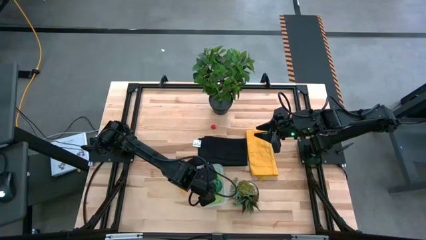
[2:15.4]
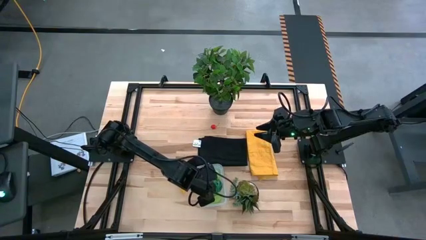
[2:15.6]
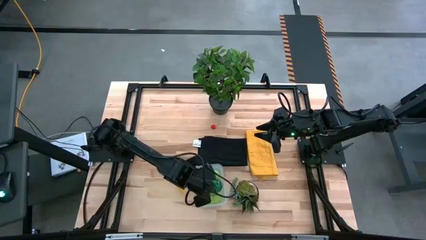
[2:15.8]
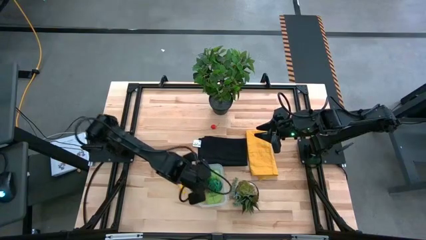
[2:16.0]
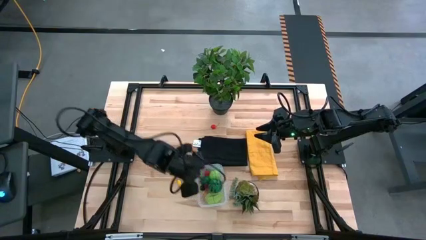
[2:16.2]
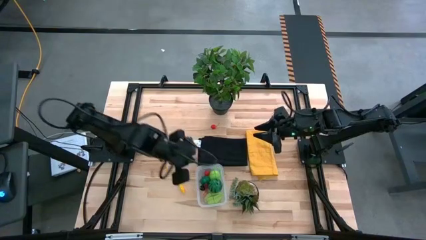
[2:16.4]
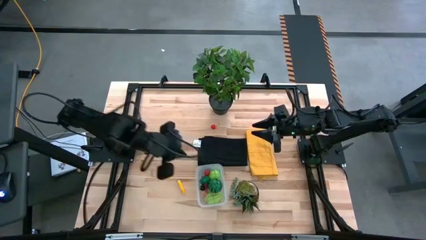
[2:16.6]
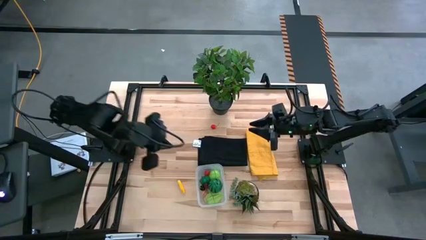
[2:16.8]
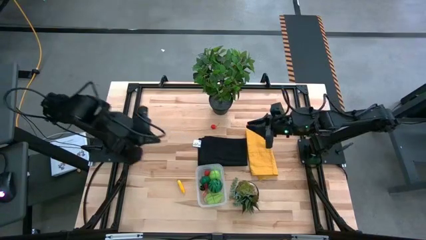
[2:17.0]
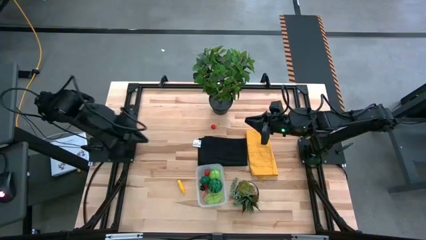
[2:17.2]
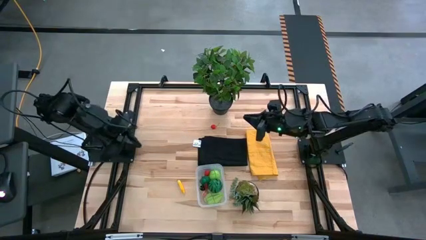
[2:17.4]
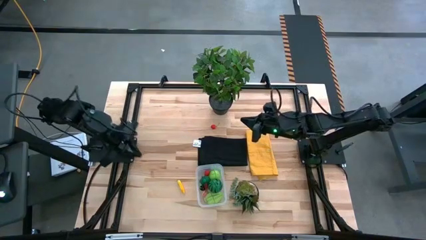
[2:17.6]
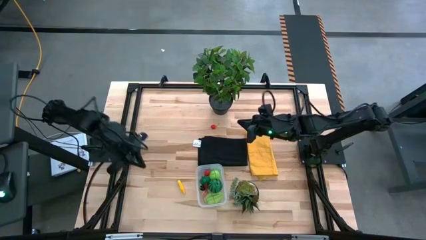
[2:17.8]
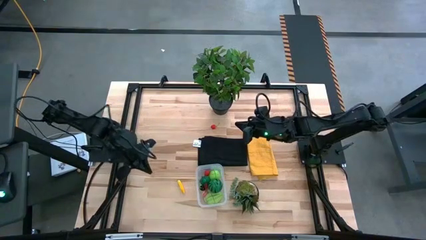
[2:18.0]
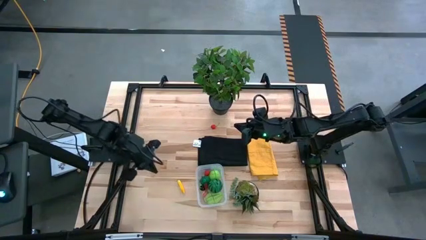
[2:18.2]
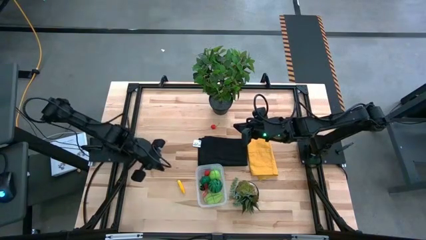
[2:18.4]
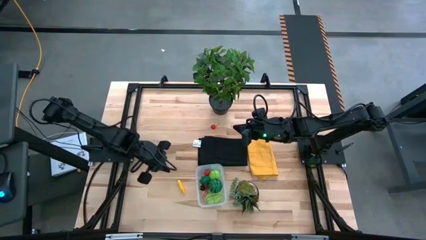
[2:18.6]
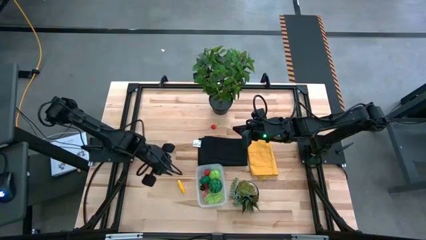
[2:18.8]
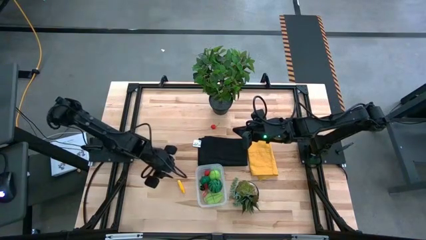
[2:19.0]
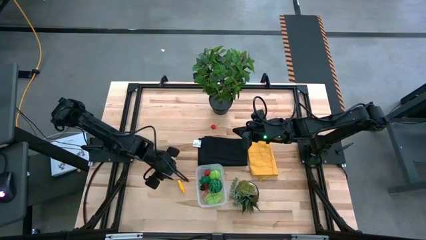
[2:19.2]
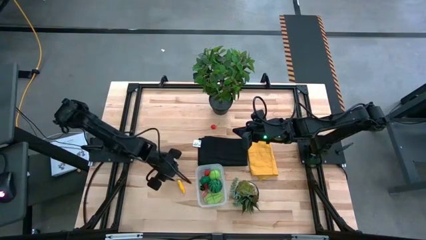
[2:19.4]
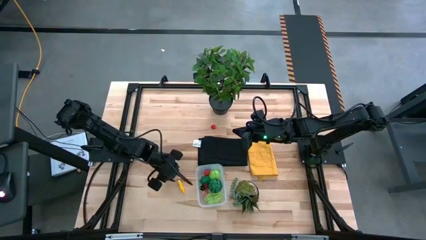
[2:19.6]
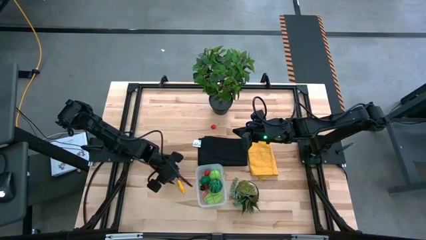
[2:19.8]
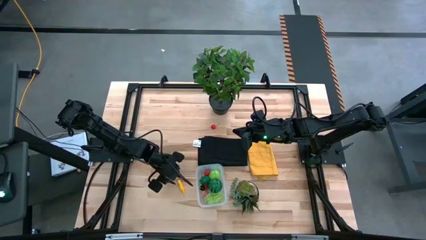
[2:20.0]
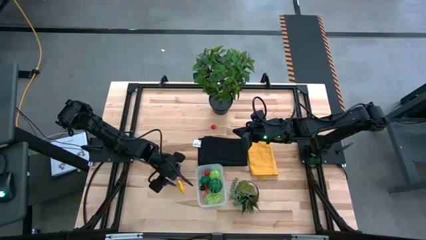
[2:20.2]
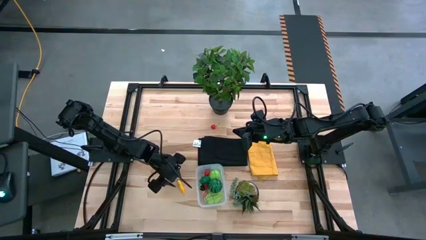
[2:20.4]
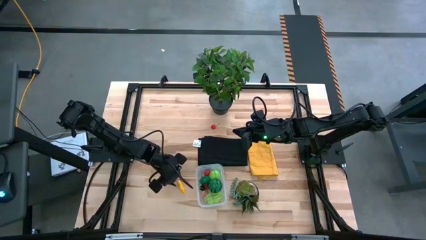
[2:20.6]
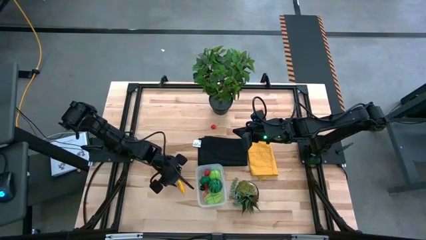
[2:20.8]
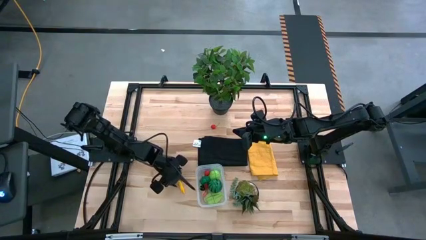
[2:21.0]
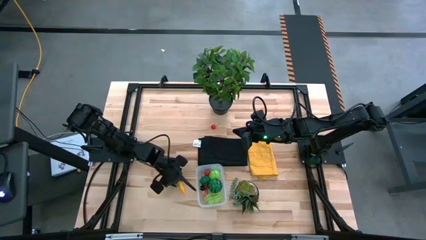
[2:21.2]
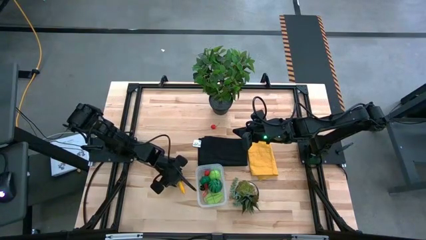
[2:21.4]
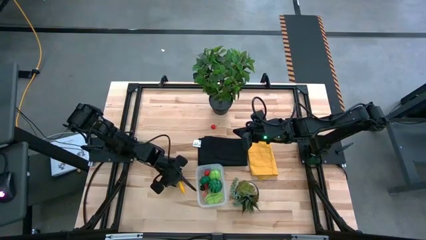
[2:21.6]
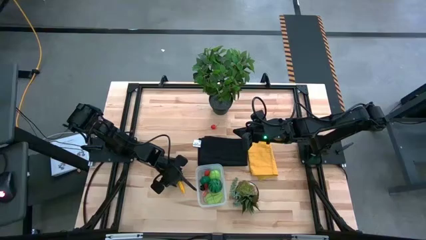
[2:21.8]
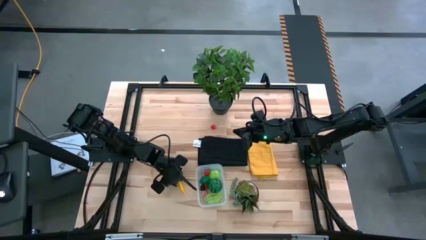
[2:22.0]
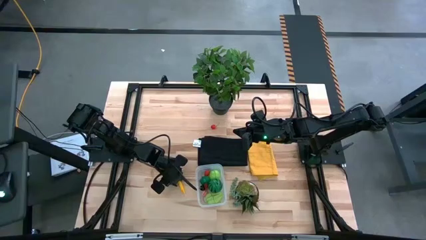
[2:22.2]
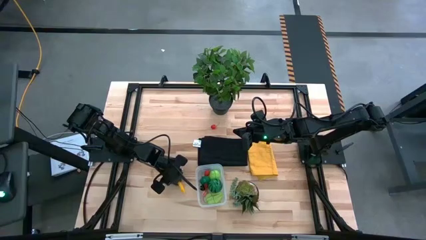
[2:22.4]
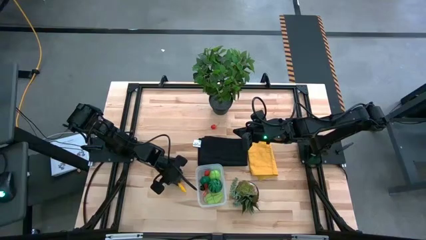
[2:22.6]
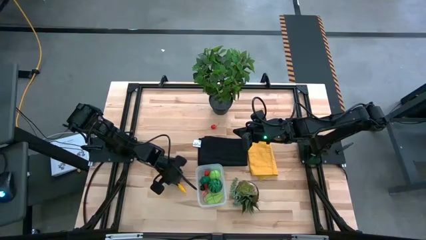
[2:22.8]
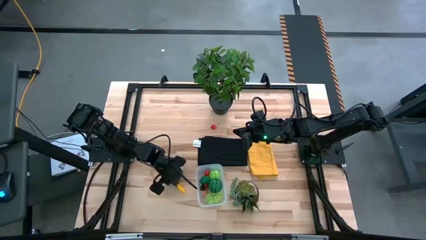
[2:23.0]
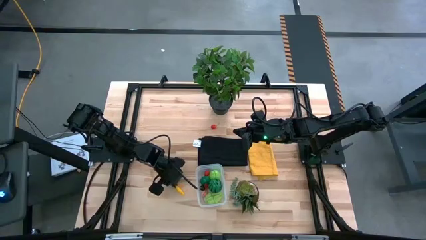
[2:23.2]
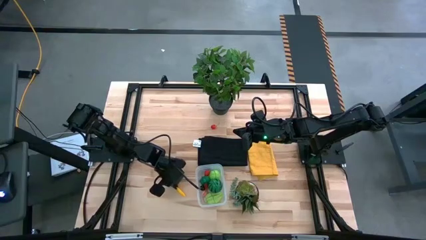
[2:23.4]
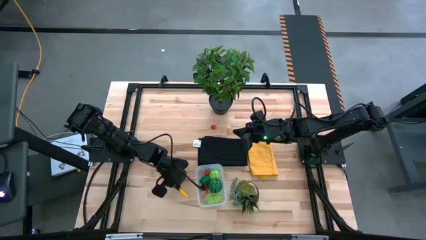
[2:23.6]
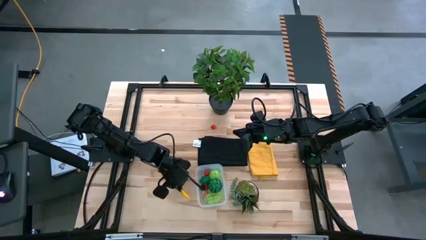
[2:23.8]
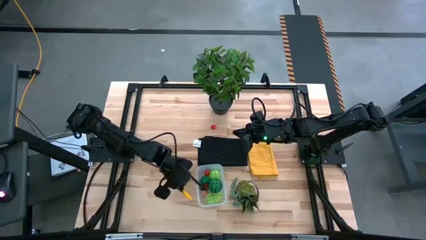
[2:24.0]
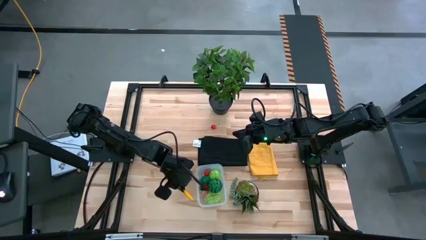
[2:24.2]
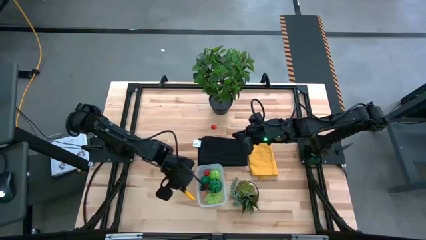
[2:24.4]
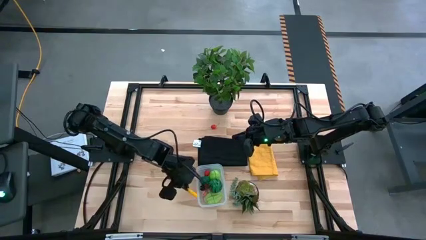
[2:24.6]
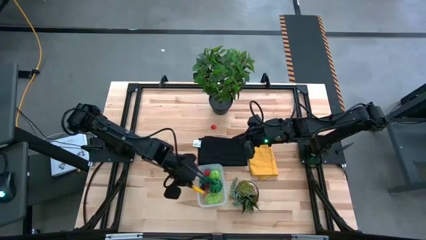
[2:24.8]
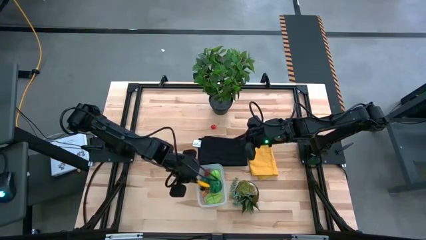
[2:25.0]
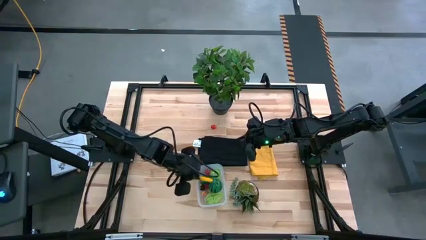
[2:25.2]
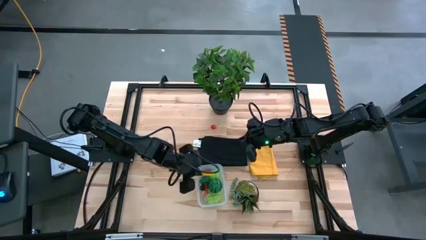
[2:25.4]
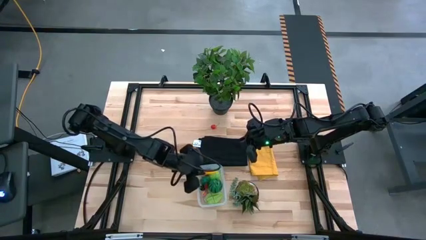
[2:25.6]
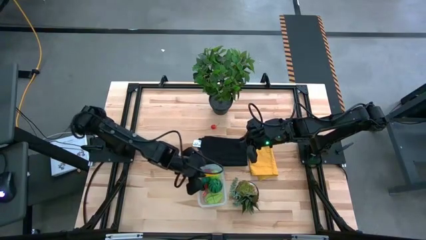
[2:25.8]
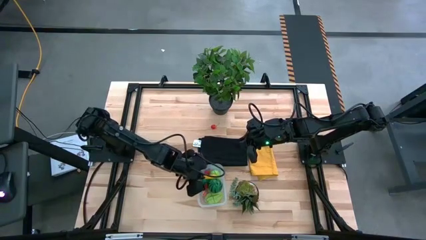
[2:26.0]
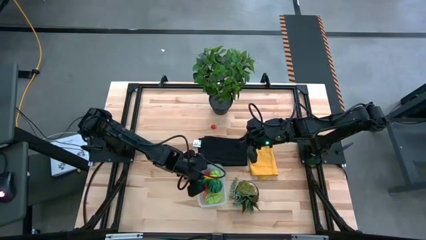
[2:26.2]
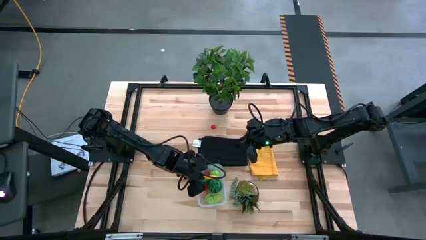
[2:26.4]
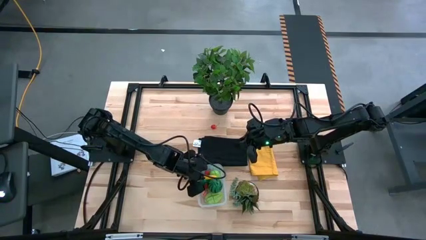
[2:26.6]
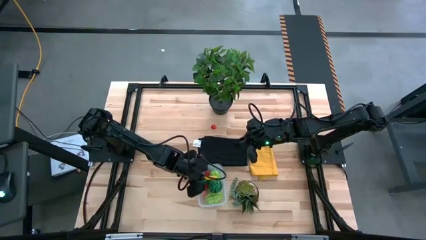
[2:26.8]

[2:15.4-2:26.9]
Task: Pick and placing Produce into tupperware
Put the yellow chili into the bin

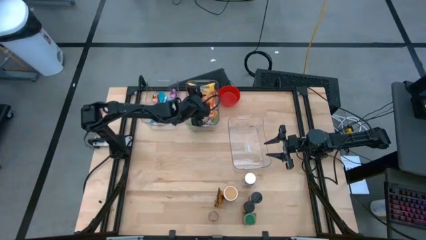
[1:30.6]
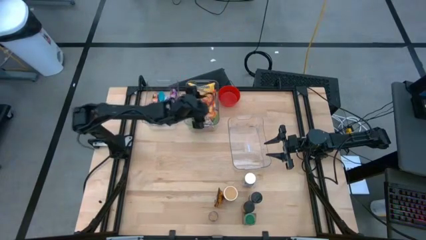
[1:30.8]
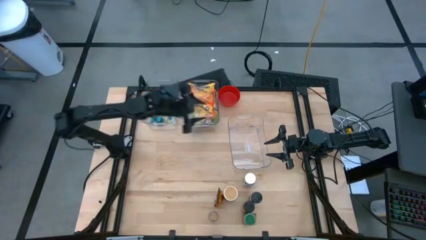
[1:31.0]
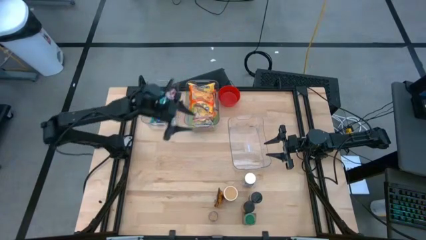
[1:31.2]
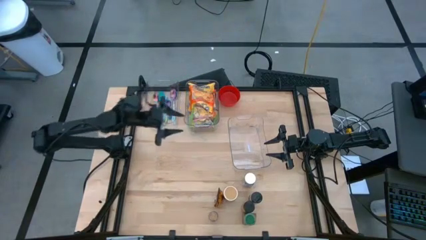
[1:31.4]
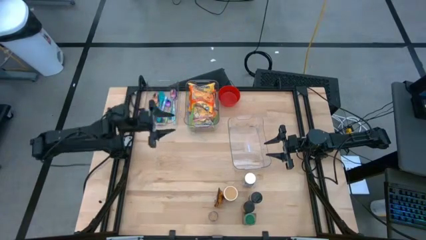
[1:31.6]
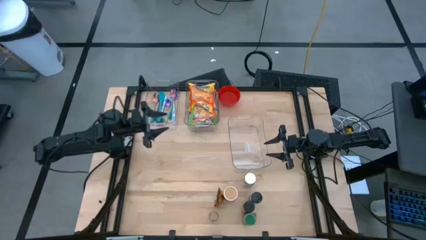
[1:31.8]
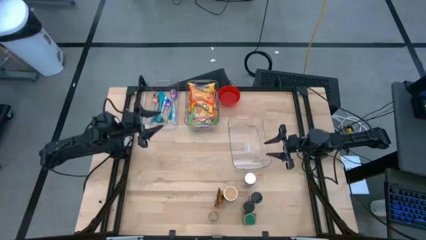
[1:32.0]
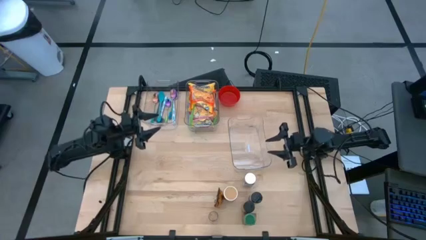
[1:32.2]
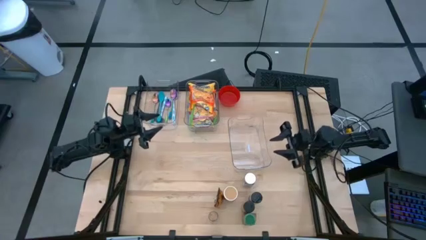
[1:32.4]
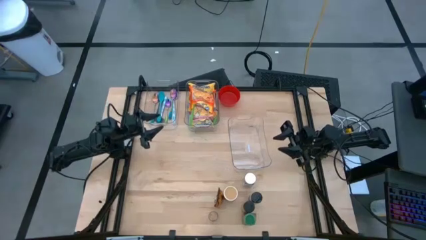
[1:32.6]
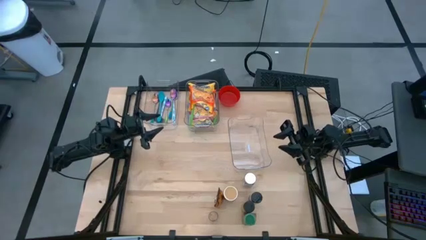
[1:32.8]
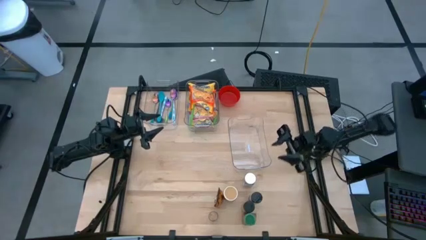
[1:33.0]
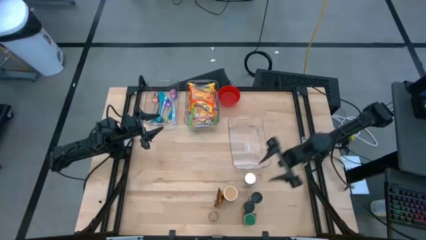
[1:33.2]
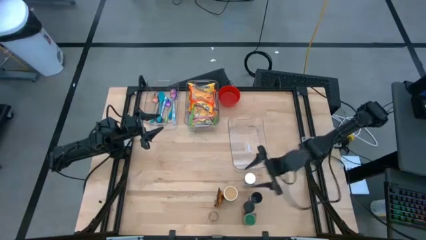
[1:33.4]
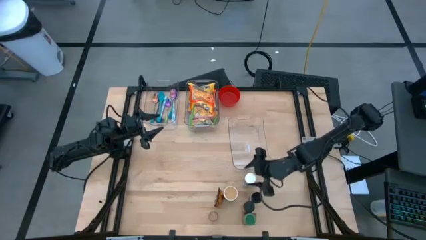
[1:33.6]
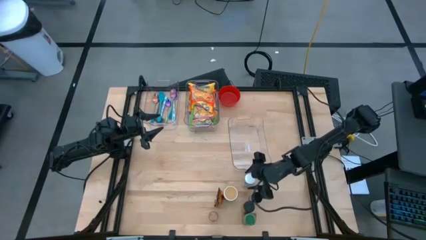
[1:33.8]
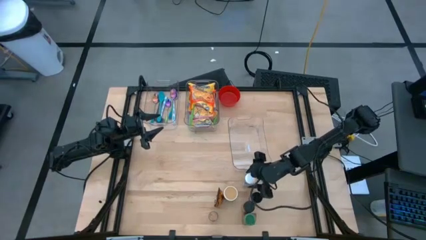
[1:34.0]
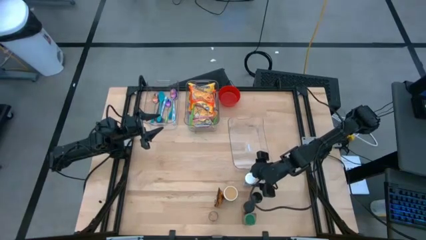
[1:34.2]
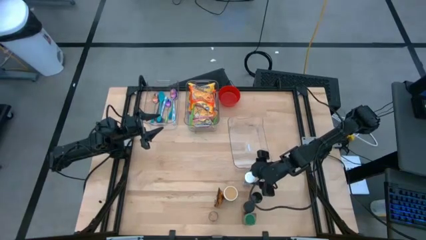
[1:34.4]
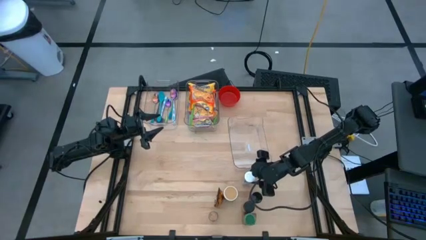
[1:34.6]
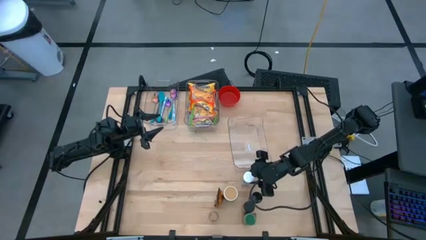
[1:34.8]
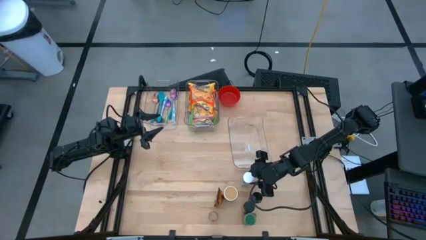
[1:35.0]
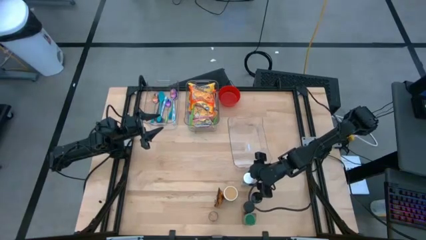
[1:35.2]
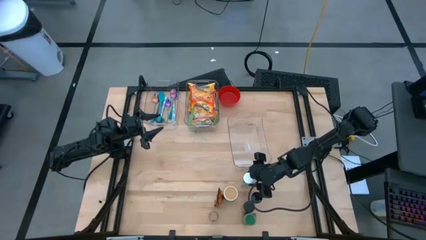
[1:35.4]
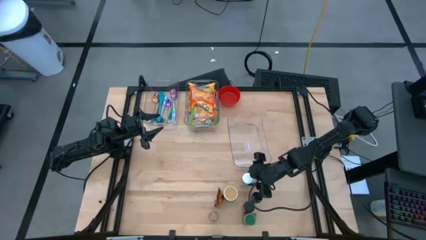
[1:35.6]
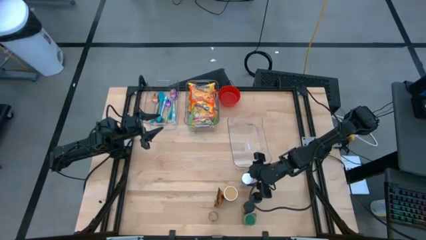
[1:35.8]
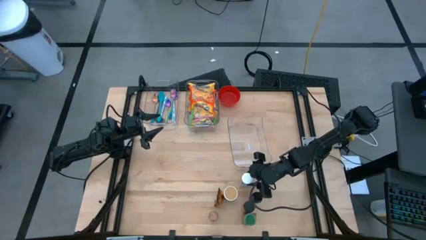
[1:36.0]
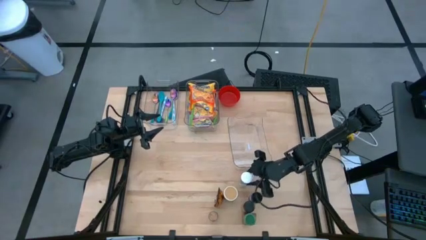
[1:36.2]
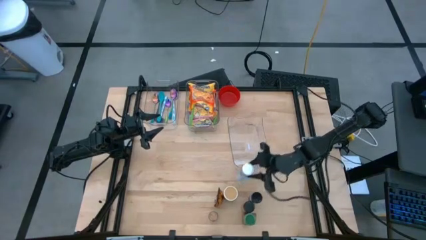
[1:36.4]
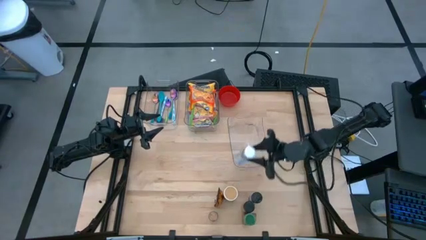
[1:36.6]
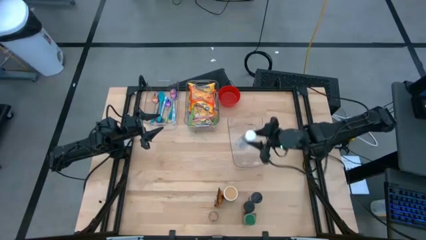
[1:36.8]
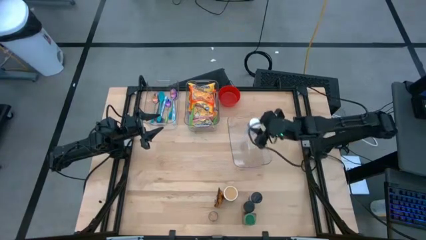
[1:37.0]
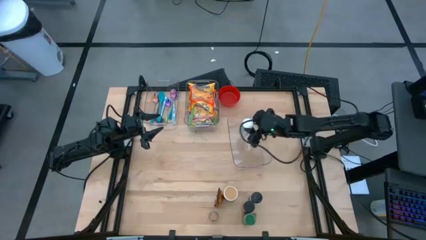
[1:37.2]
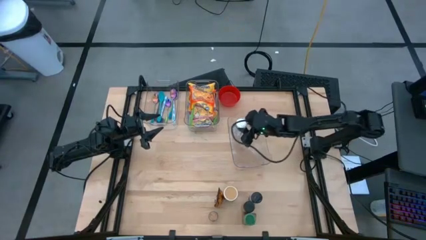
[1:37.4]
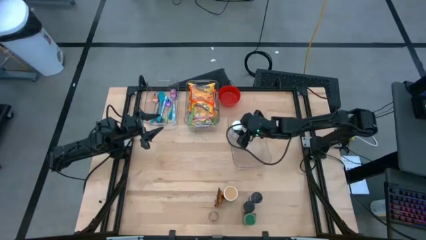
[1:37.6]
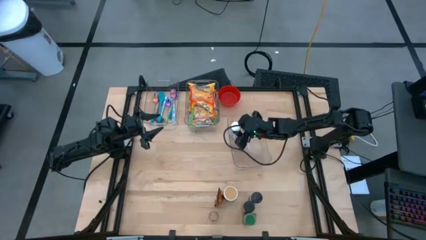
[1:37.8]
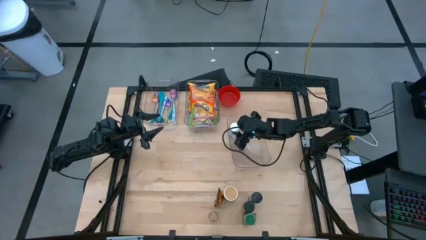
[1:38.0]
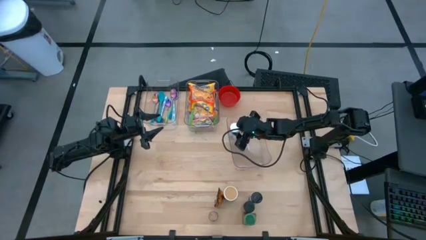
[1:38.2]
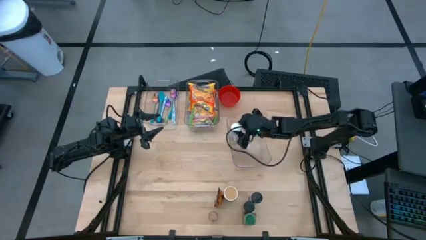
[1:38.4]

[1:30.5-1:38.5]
Task: Pick & Place Food Item
Put the white seasoning bottle into the bottom right transparent bin
